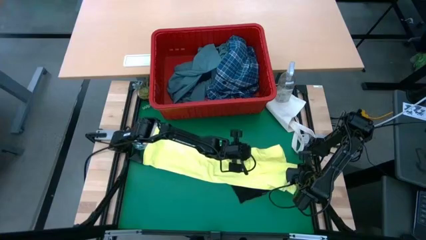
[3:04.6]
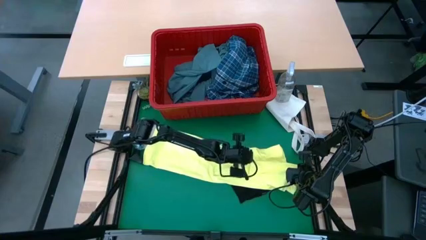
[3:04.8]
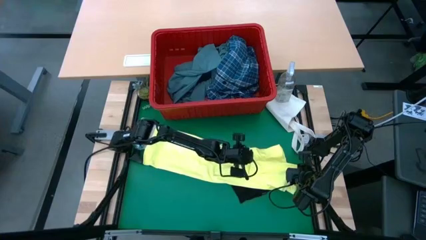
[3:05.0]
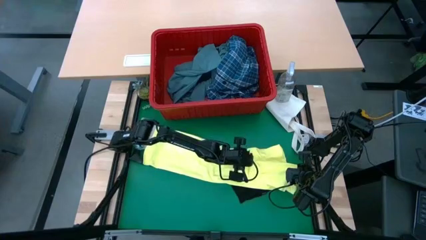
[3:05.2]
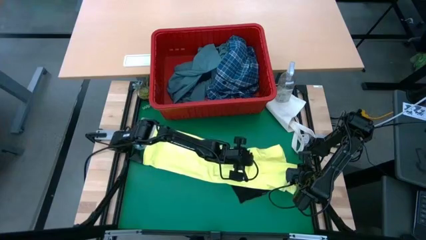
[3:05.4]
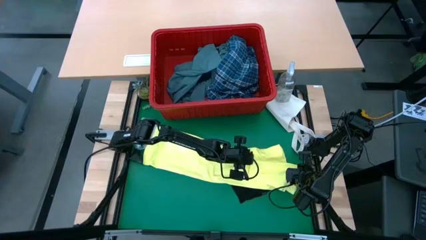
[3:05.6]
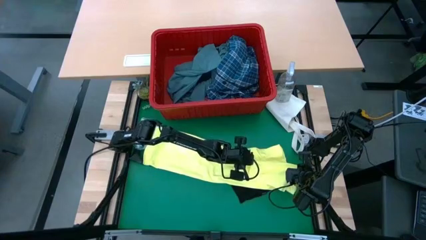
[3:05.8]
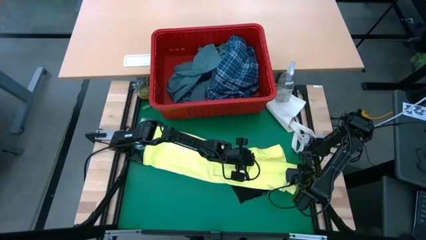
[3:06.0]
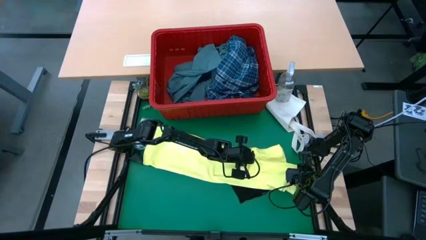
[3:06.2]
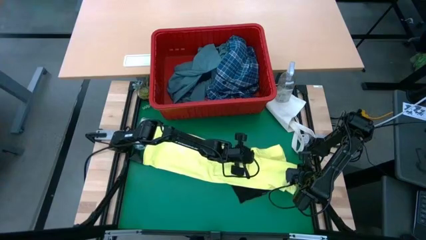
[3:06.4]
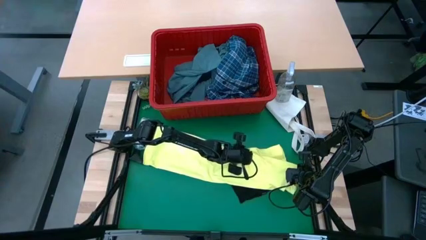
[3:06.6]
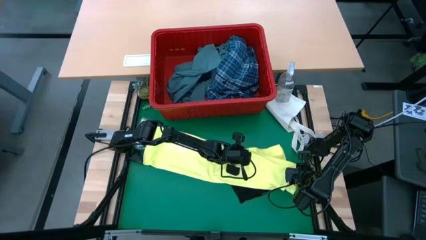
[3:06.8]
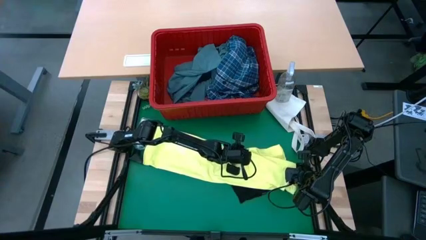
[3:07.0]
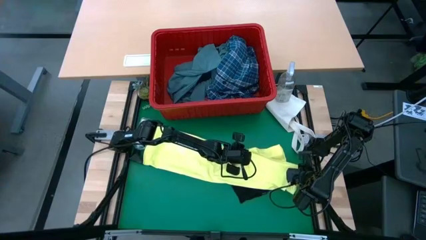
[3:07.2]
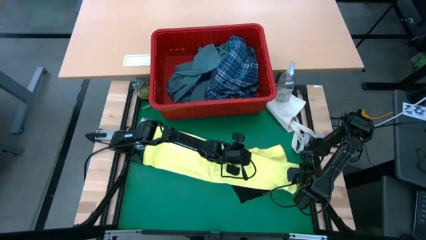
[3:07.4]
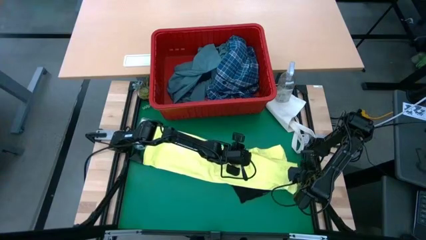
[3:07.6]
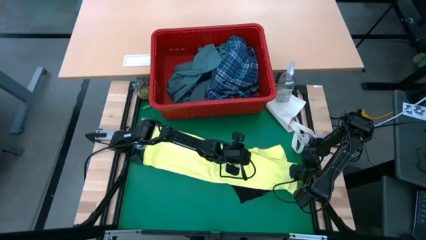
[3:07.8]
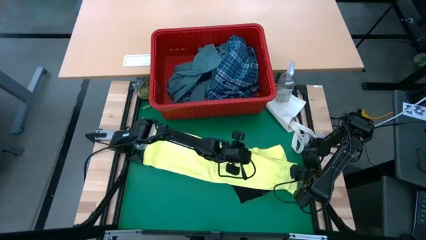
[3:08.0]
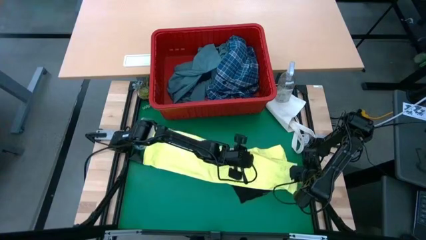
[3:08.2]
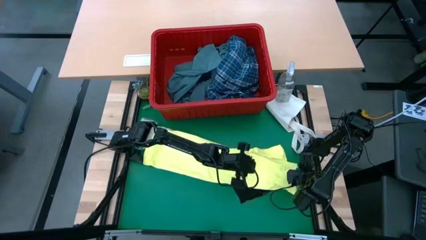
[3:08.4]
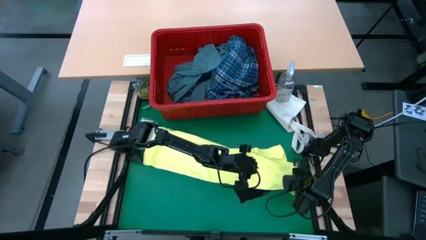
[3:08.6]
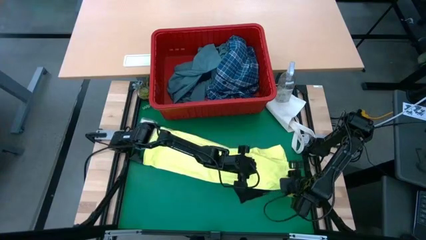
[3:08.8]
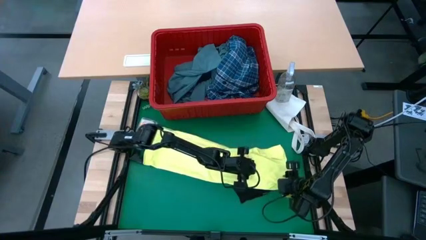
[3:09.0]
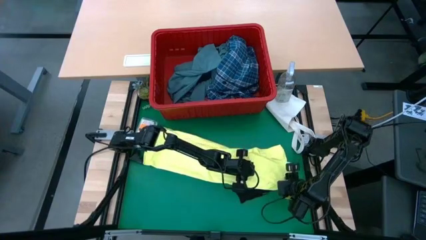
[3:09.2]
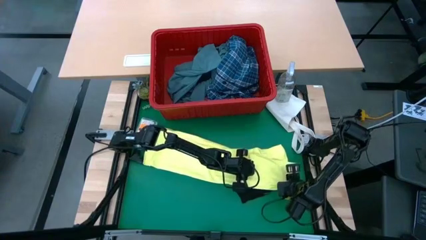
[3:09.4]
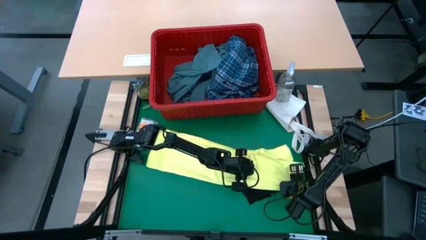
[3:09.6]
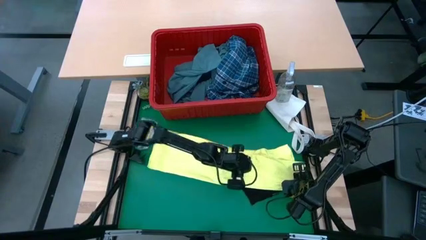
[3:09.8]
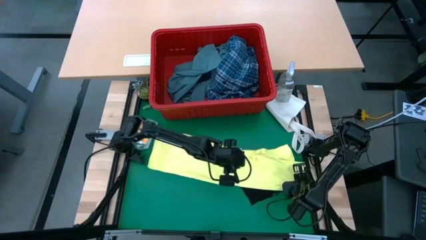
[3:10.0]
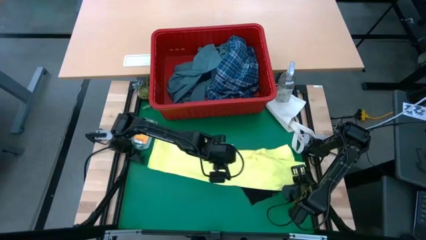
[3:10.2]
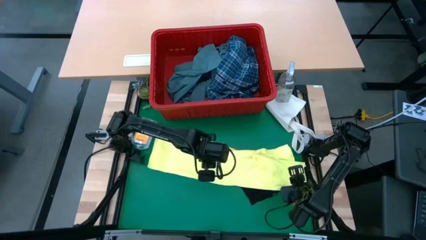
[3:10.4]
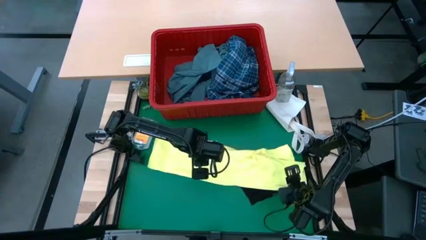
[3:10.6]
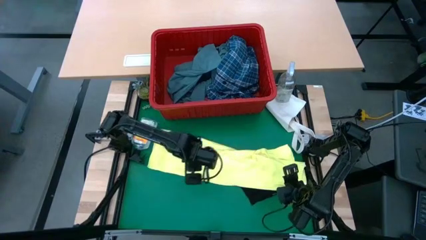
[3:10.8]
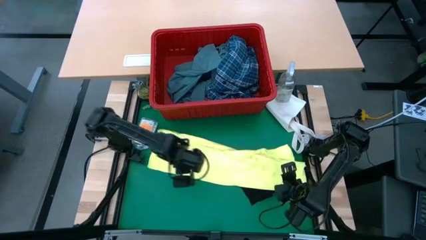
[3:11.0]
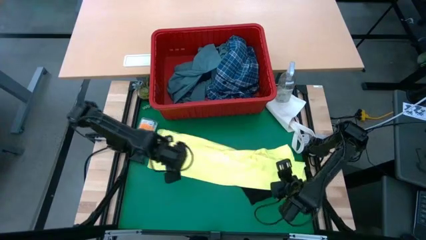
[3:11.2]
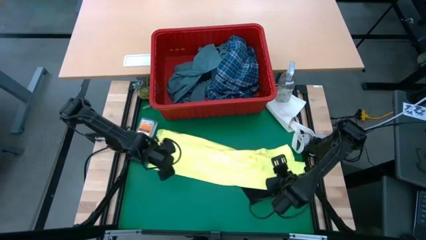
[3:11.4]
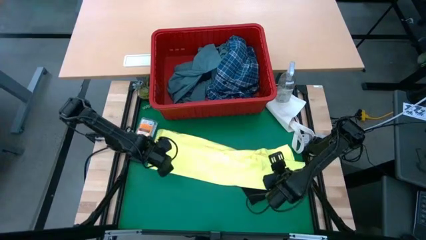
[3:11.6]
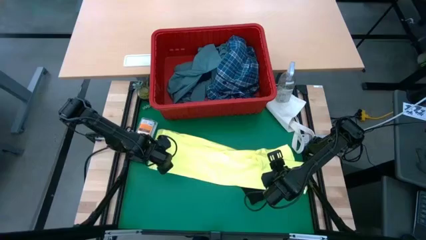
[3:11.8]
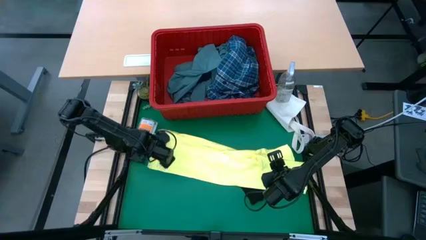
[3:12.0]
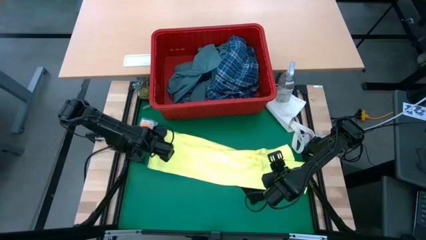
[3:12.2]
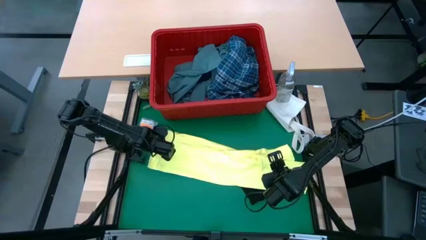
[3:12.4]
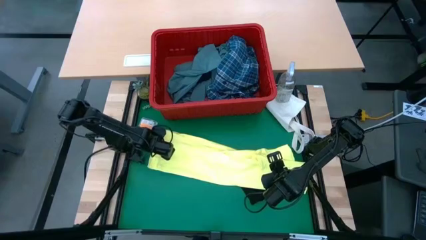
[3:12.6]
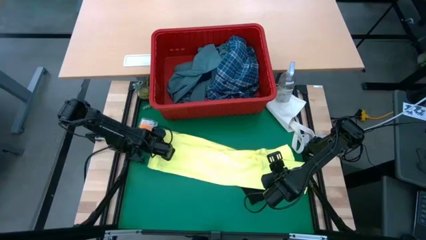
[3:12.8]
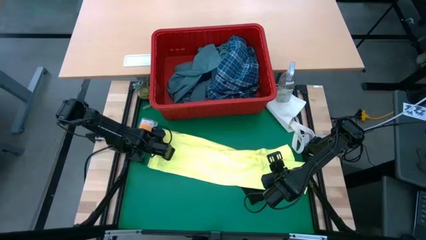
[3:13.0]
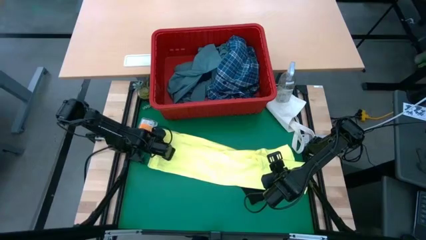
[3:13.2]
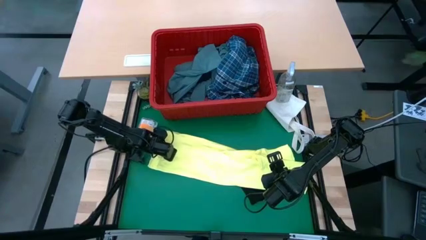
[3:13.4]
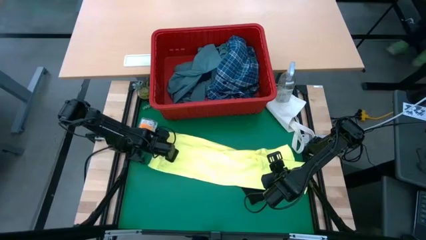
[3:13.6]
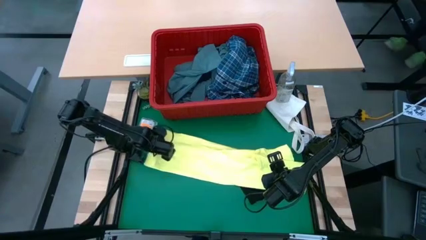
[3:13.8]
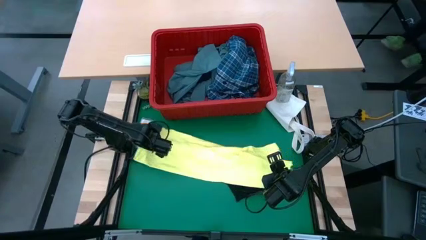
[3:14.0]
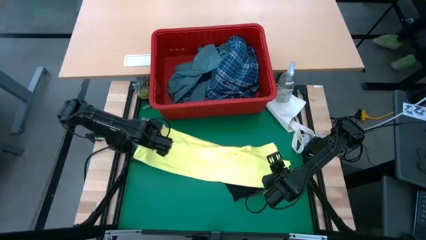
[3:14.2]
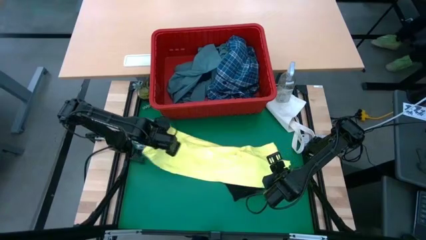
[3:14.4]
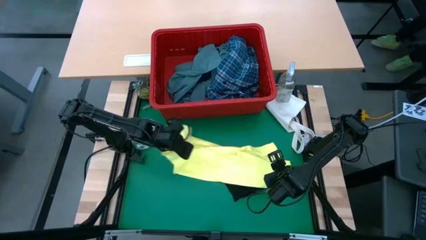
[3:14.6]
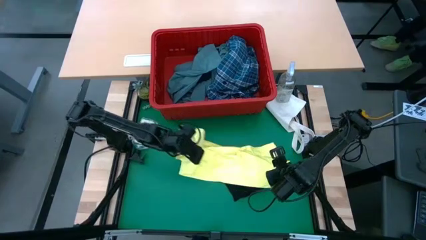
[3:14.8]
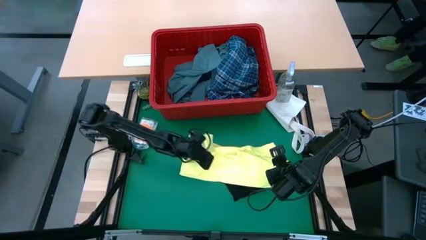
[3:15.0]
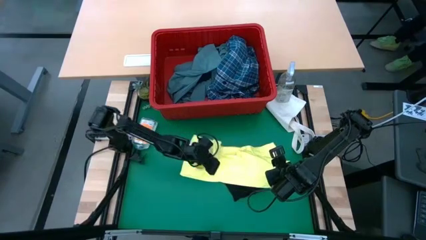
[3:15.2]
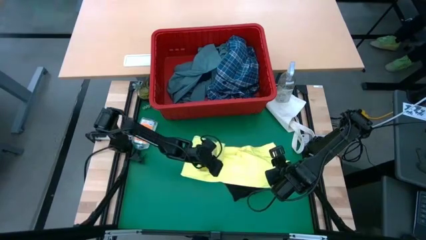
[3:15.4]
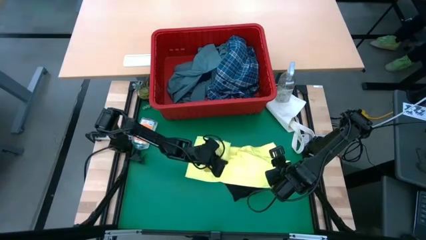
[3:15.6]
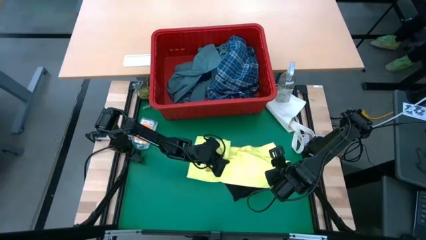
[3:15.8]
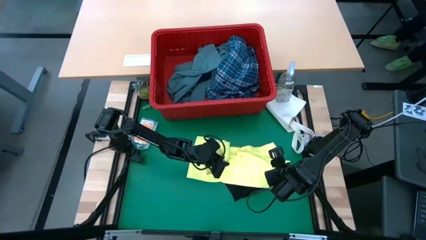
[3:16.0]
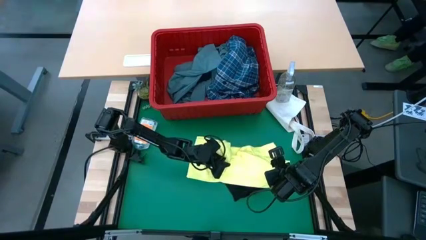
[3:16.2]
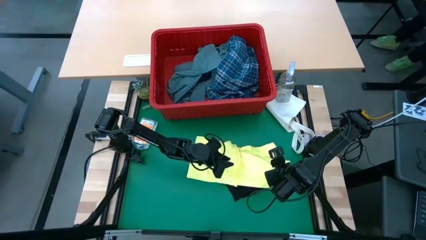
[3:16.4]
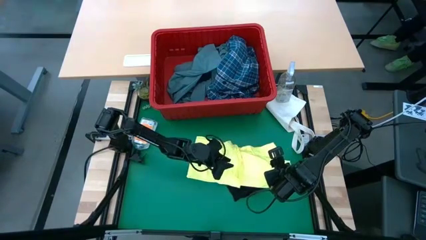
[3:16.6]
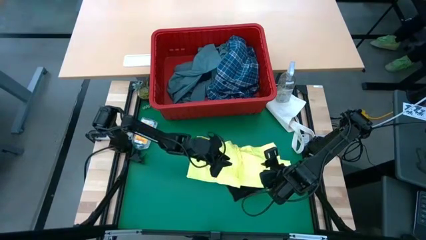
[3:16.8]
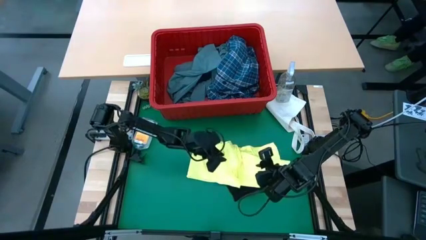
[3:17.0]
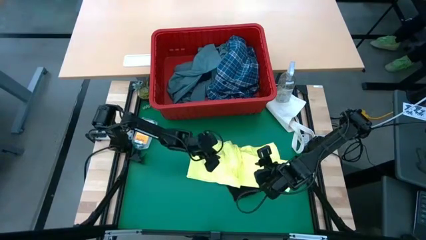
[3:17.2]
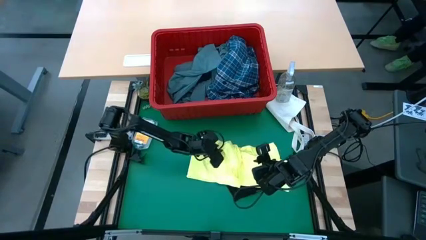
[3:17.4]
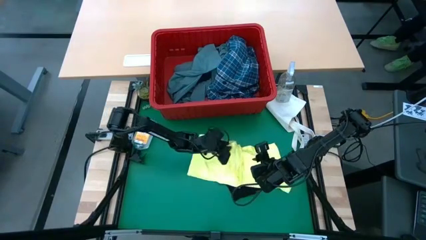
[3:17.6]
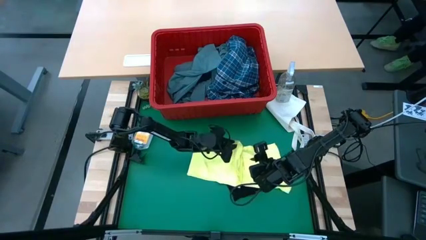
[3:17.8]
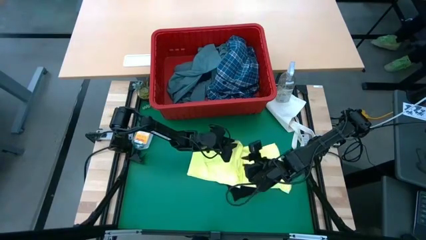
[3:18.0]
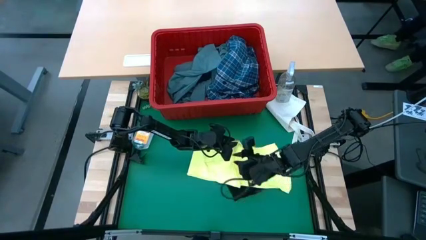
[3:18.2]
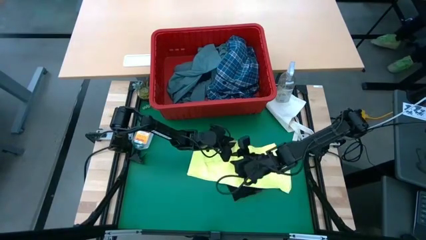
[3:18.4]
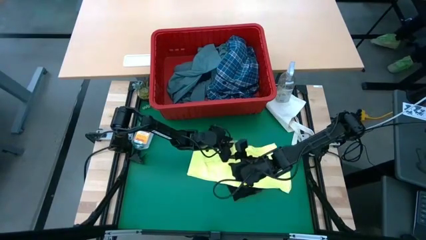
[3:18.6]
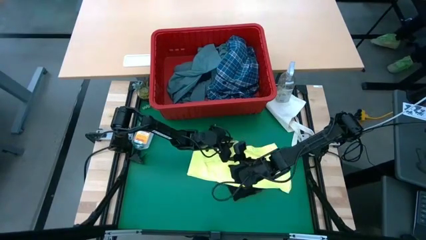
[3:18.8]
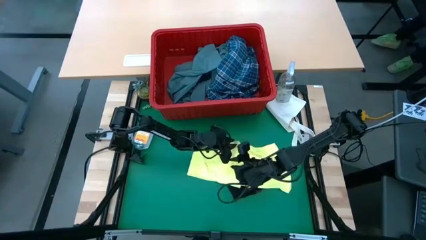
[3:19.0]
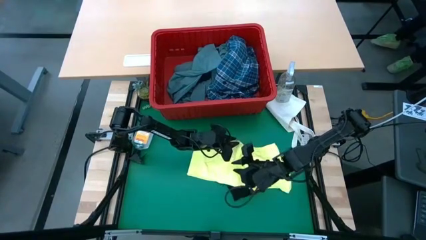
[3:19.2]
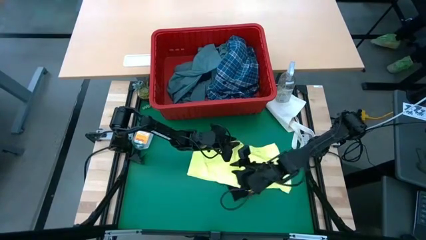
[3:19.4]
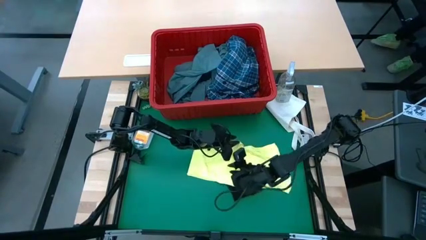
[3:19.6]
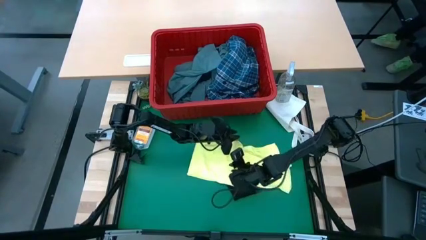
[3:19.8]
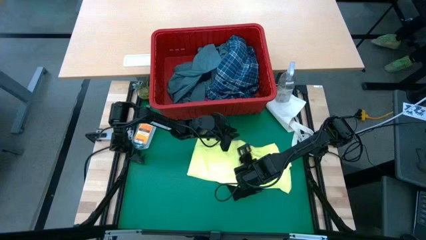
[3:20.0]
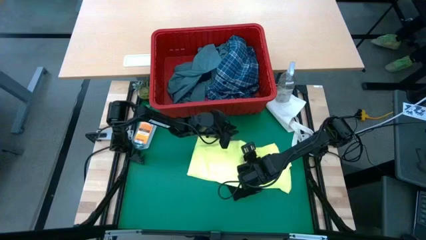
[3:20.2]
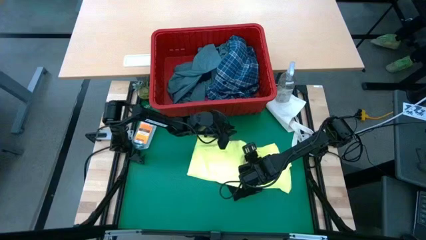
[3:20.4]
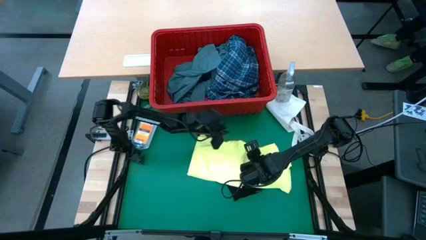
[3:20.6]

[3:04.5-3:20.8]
Task: Fold Laundry from Bin
Fold the yellow shirt
